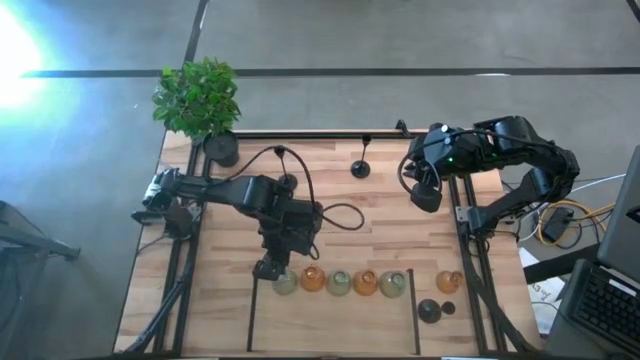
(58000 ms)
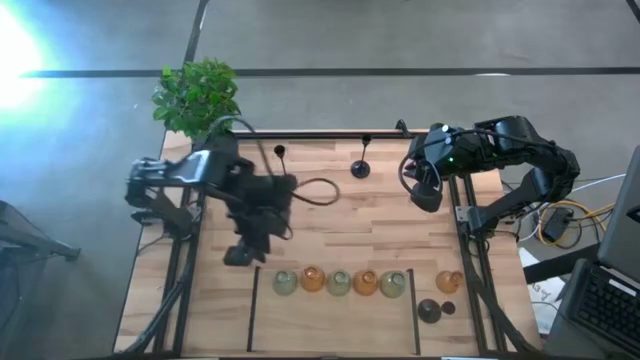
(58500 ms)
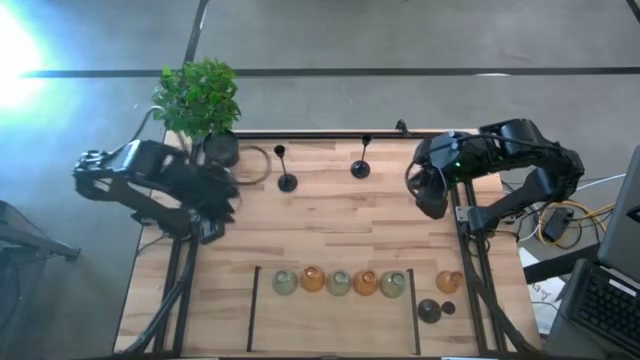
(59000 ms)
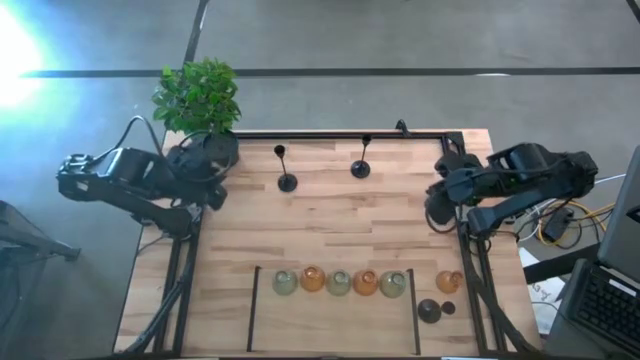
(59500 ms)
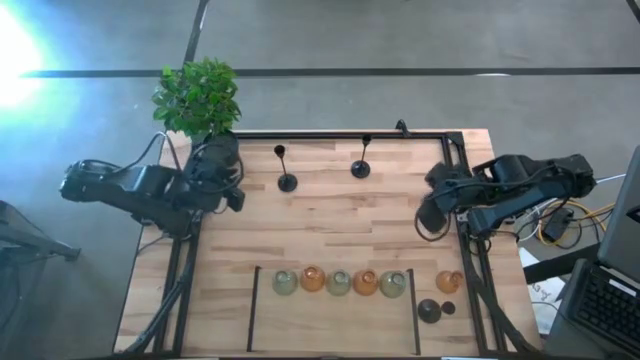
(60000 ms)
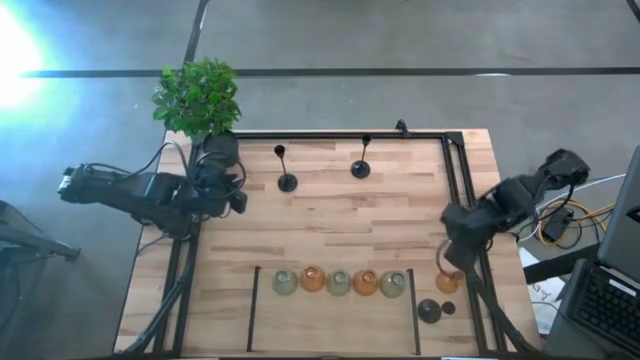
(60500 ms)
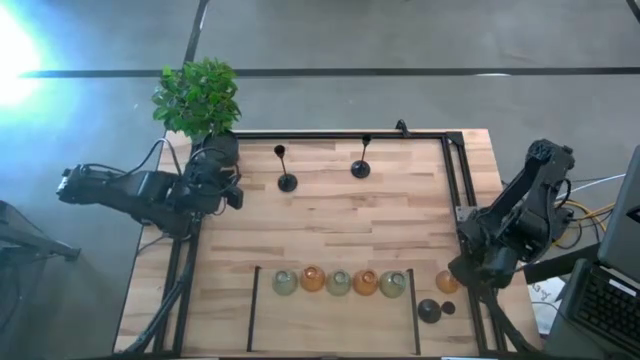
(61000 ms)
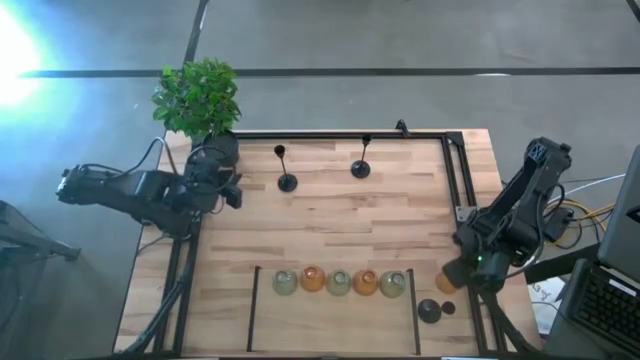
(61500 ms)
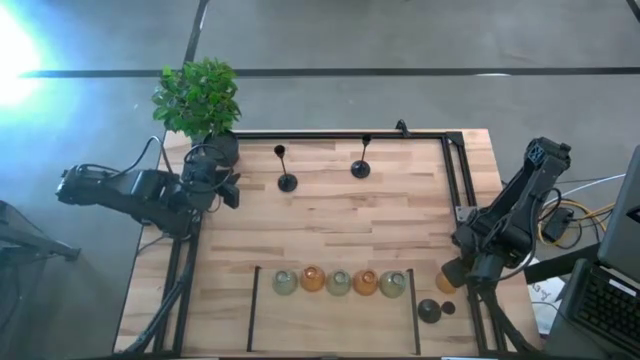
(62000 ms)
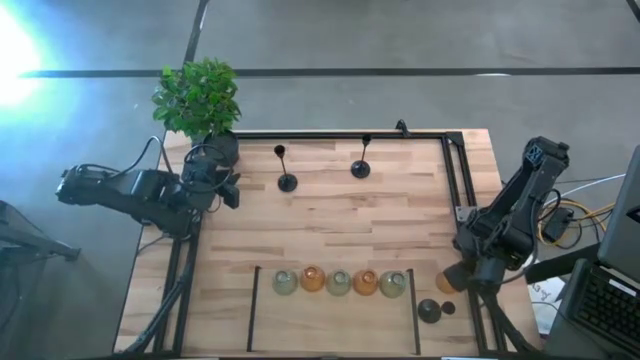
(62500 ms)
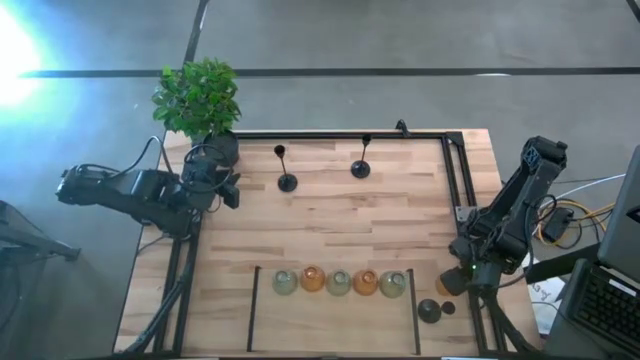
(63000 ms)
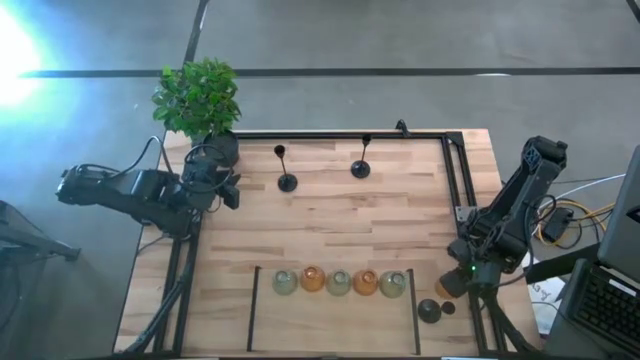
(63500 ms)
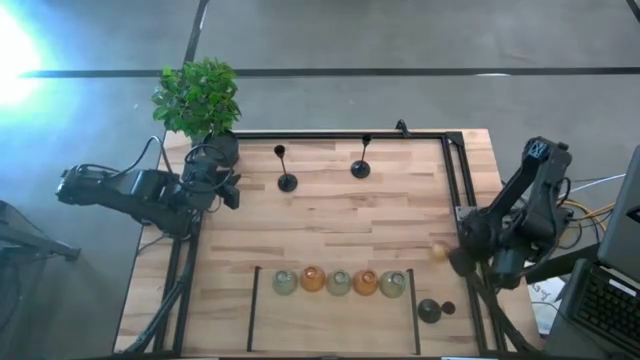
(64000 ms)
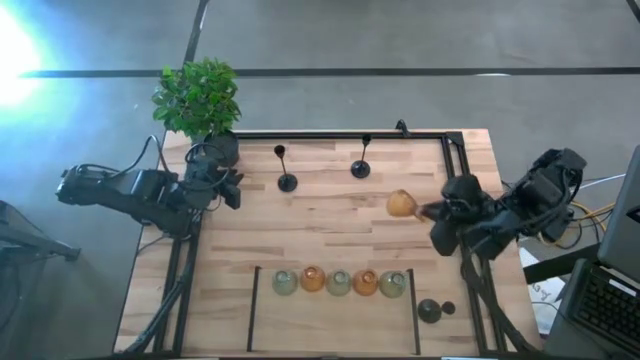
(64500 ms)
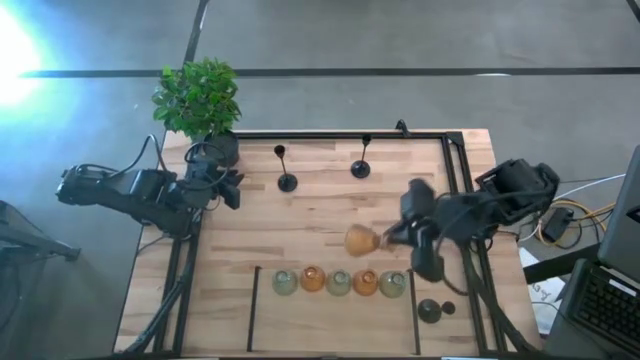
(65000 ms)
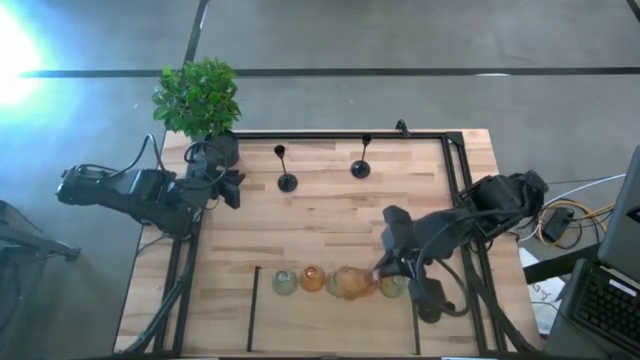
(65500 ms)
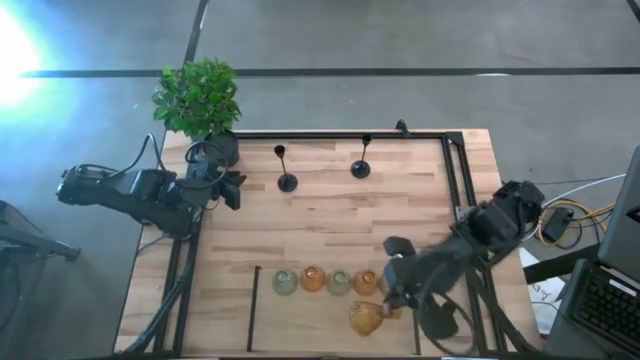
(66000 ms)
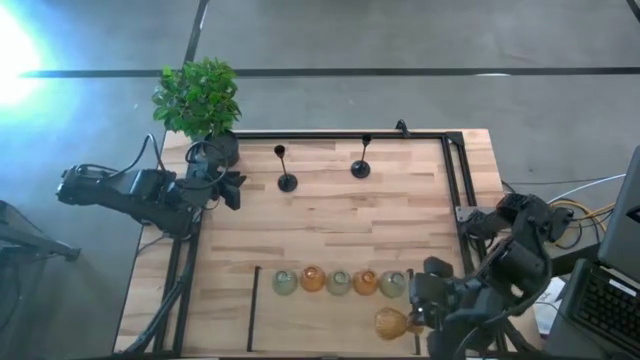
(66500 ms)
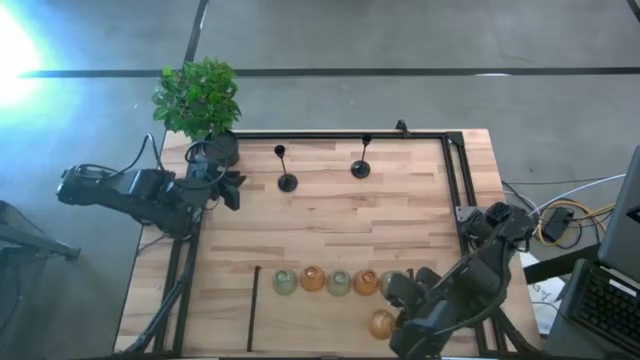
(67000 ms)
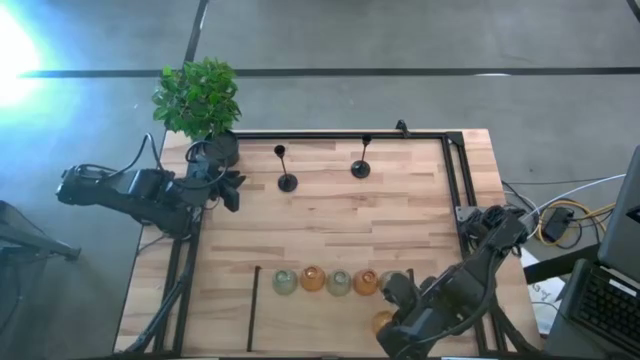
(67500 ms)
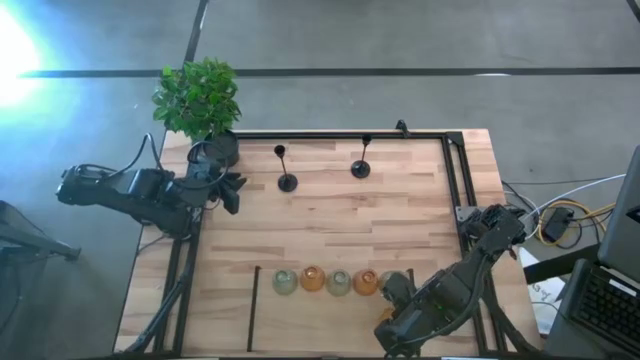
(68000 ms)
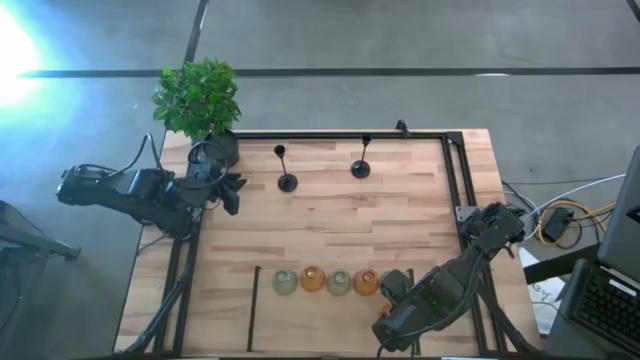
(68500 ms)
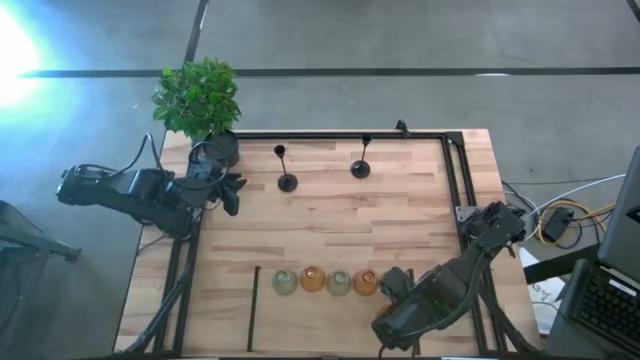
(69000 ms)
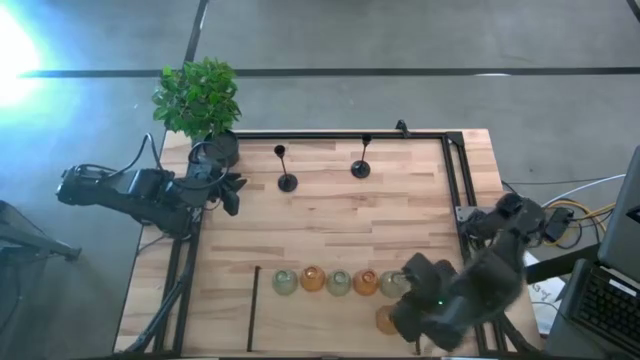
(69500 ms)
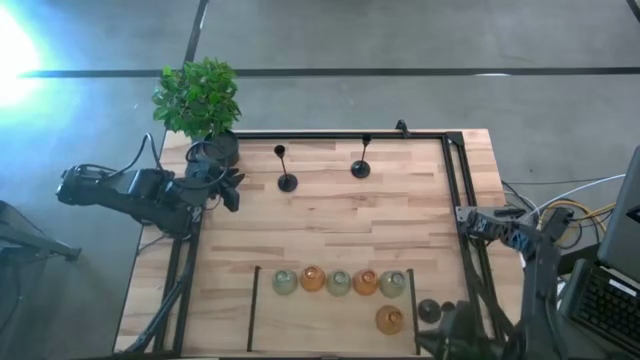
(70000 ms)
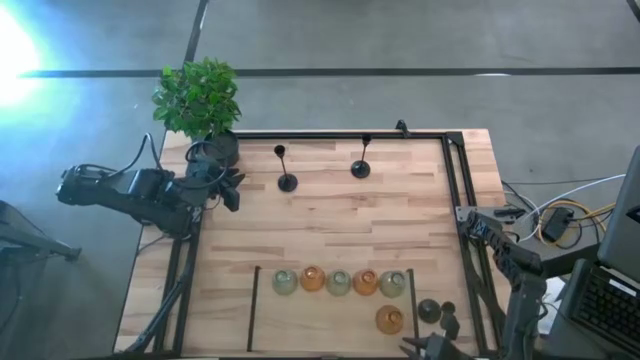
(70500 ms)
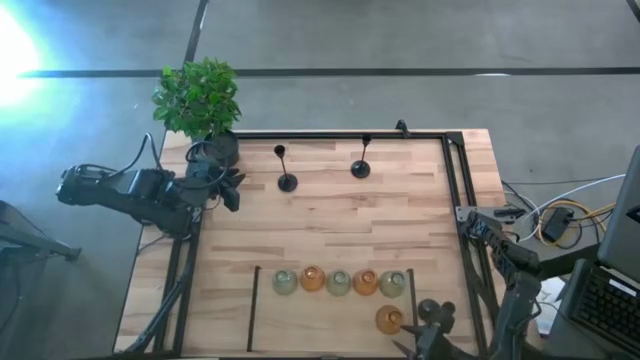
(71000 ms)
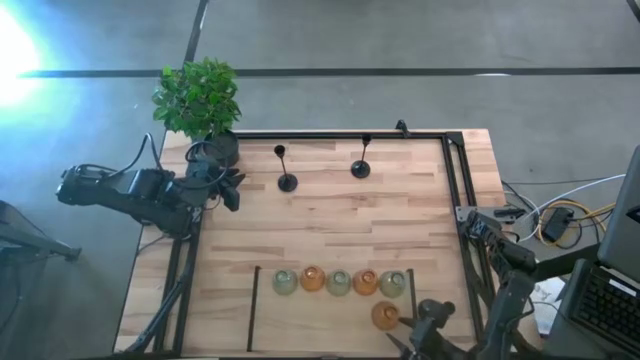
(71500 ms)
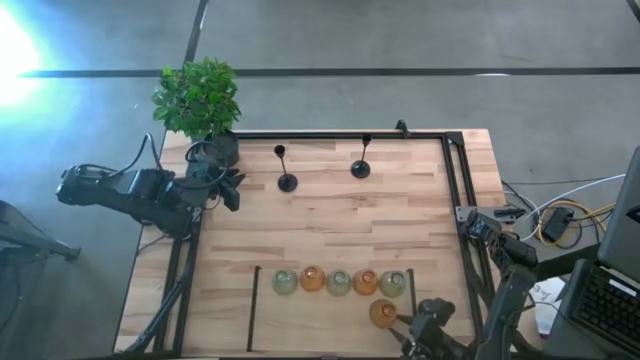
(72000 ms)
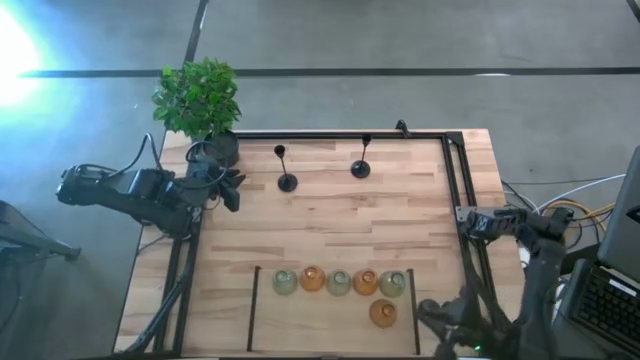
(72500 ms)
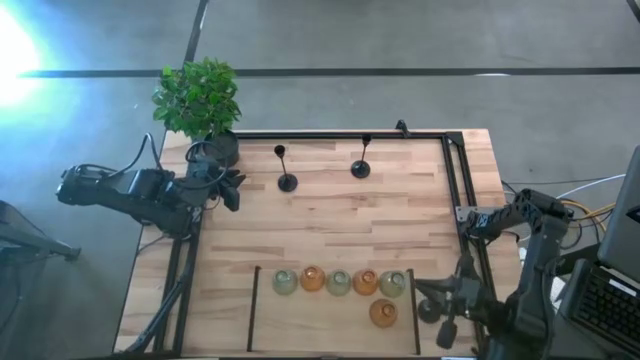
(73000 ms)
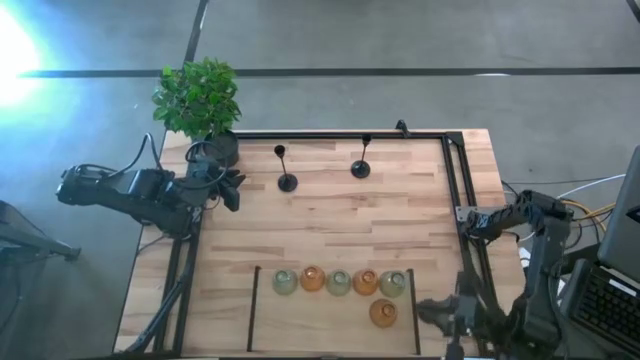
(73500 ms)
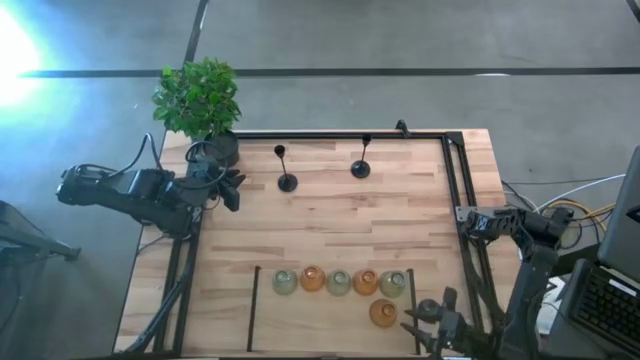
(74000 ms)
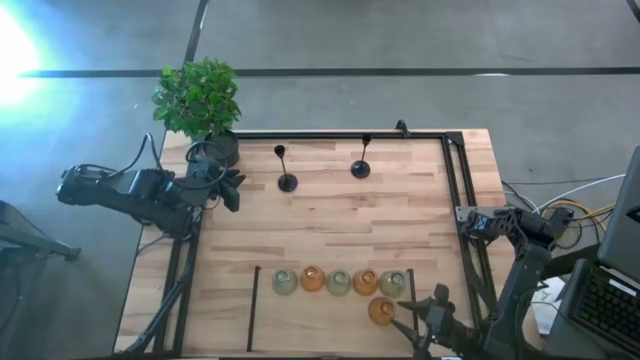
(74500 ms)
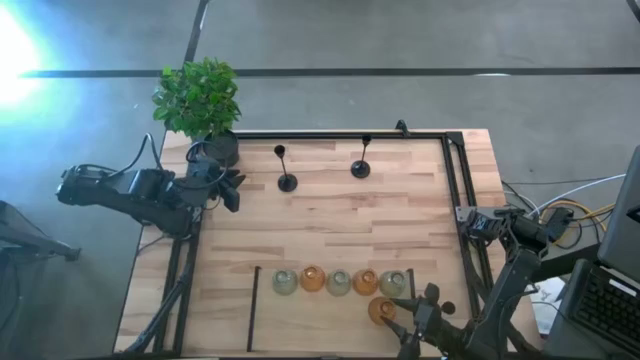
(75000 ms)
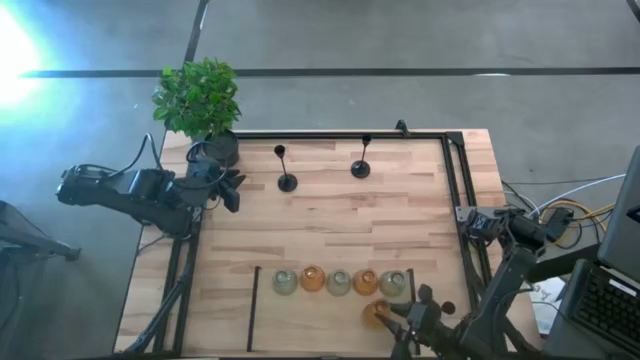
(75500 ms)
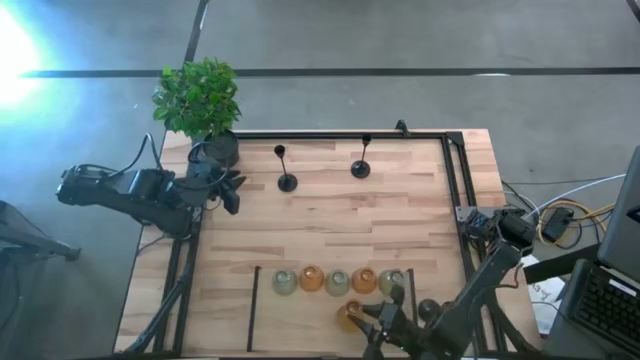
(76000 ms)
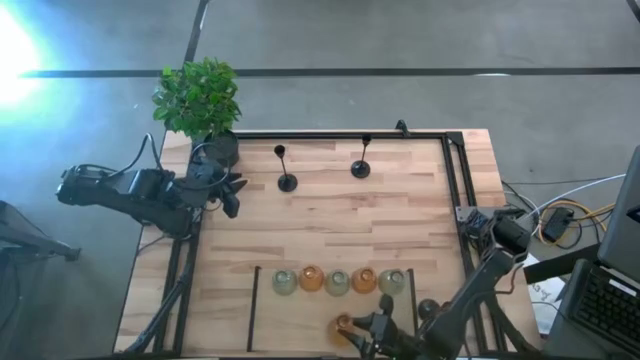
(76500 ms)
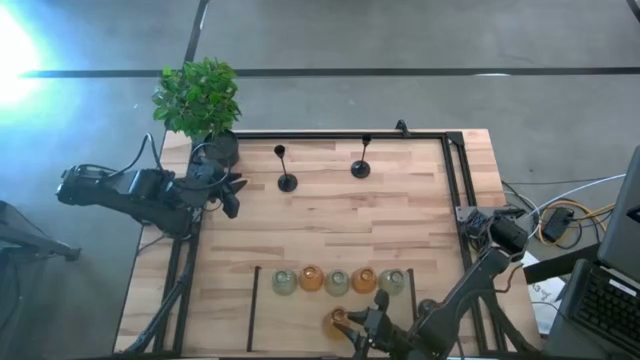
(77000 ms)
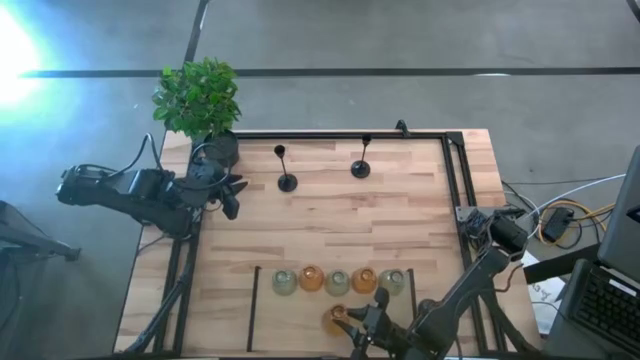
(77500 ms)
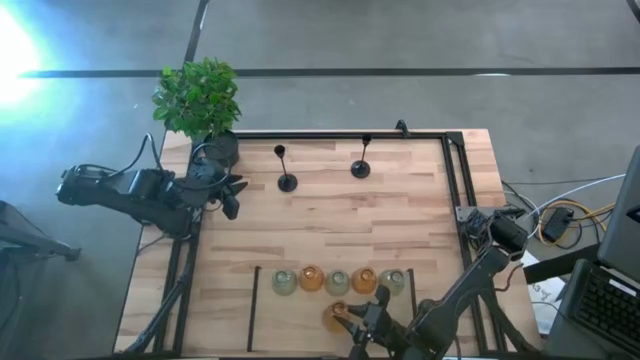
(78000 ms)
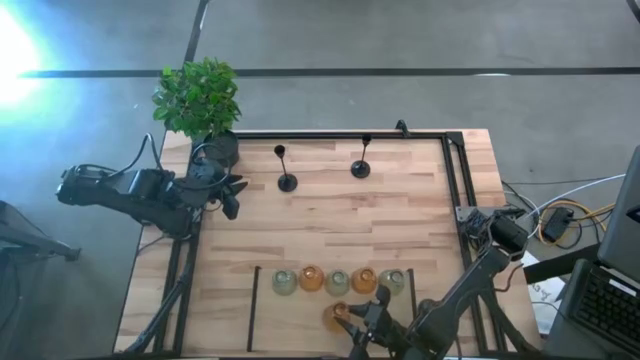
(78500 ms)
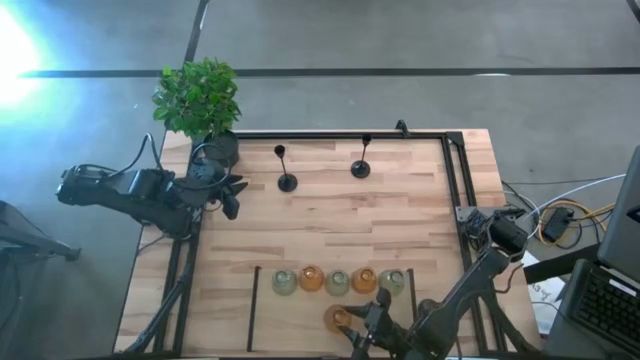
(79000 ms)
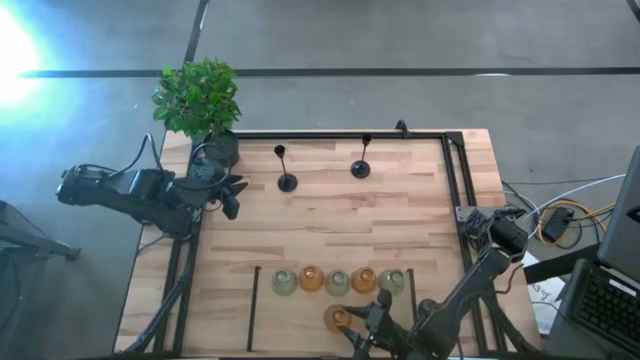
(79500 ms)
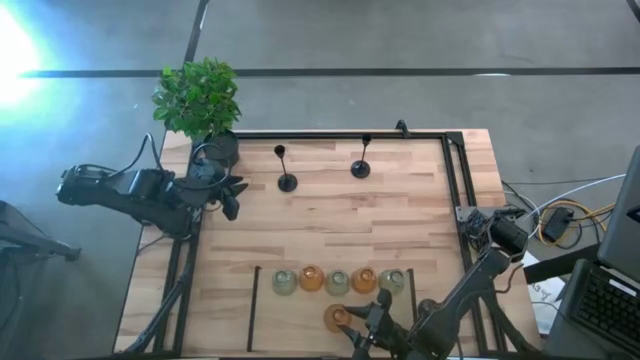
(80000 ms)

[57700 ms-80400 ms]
Task: Pick & Place candle stick holders
Put the orange glass candle holder on the shelf
